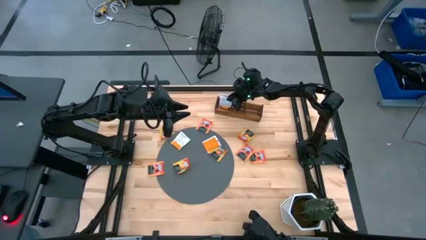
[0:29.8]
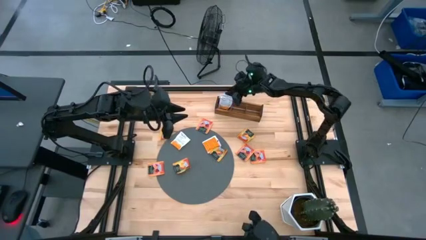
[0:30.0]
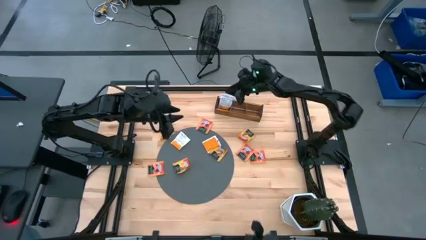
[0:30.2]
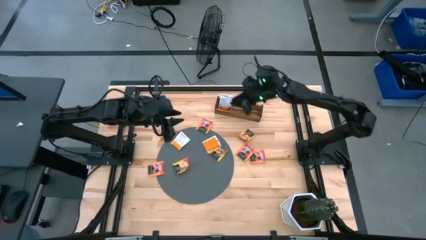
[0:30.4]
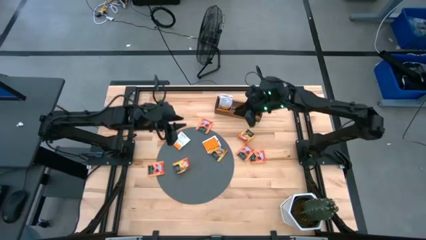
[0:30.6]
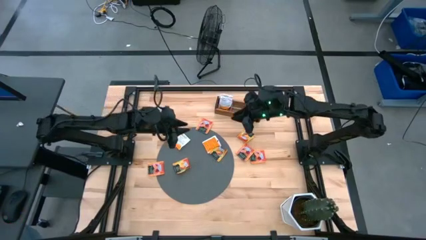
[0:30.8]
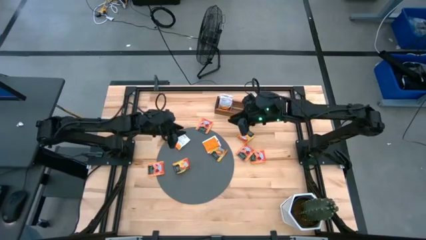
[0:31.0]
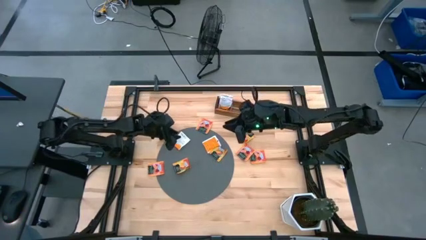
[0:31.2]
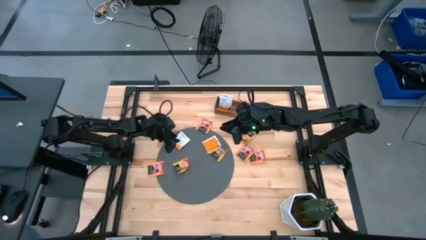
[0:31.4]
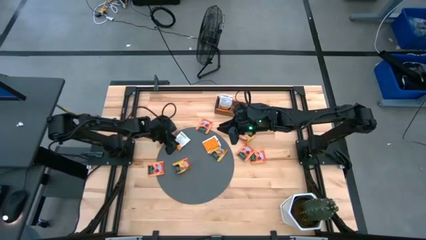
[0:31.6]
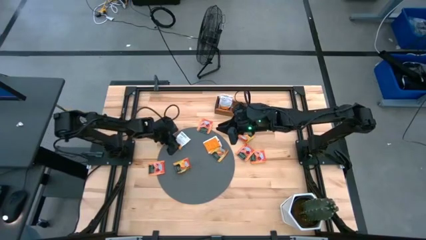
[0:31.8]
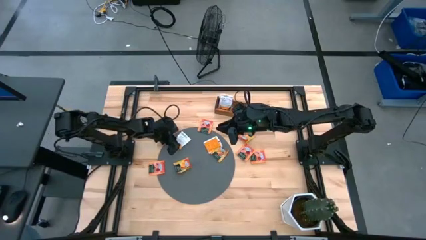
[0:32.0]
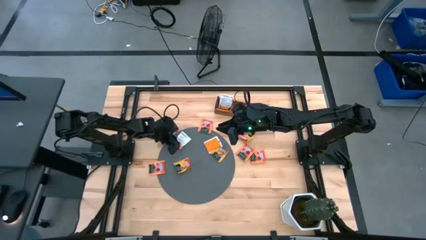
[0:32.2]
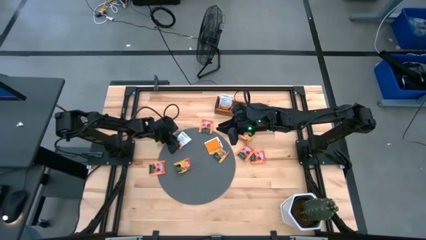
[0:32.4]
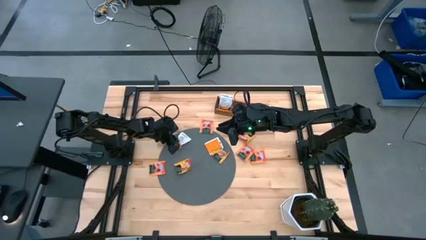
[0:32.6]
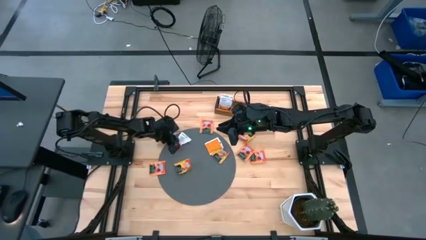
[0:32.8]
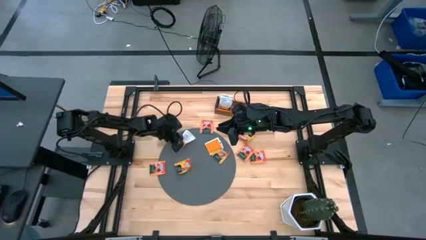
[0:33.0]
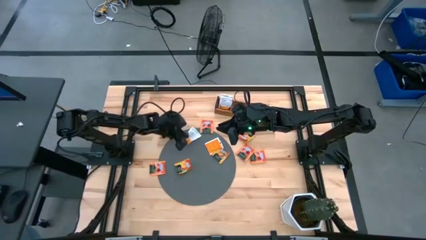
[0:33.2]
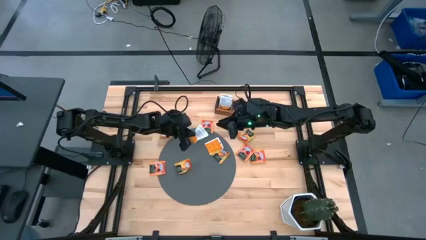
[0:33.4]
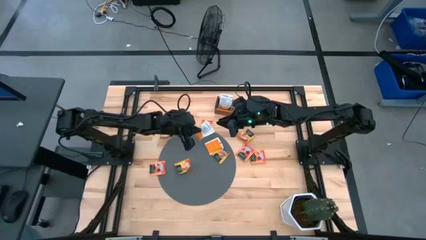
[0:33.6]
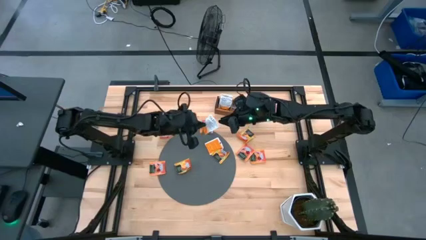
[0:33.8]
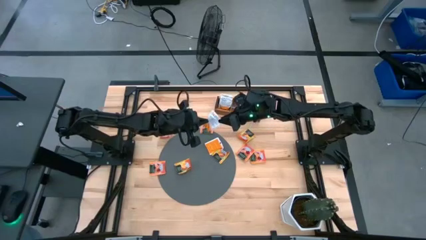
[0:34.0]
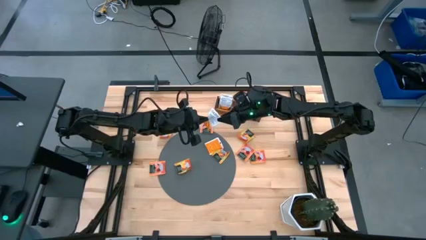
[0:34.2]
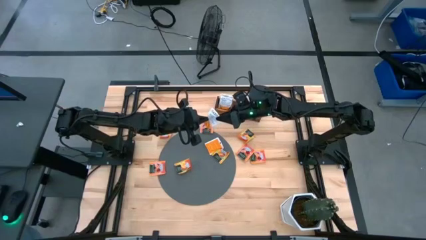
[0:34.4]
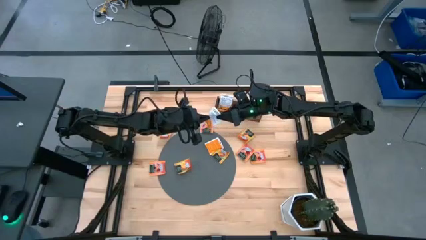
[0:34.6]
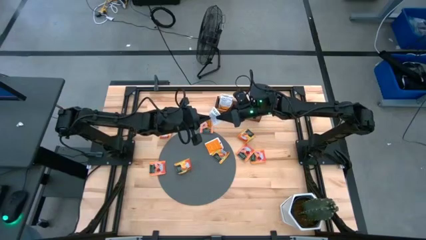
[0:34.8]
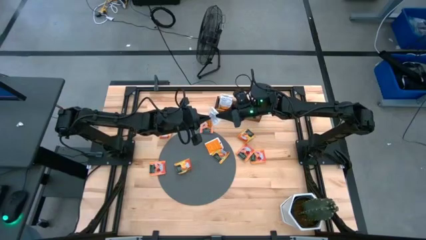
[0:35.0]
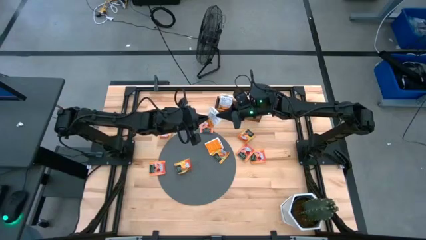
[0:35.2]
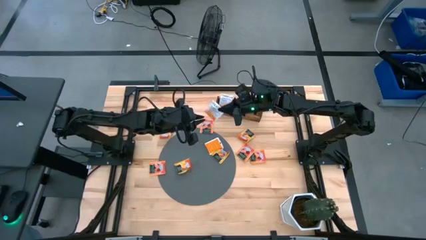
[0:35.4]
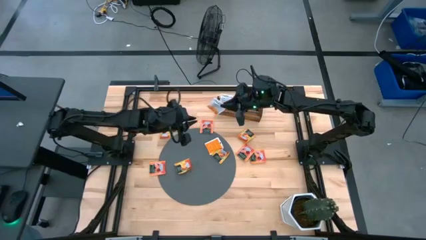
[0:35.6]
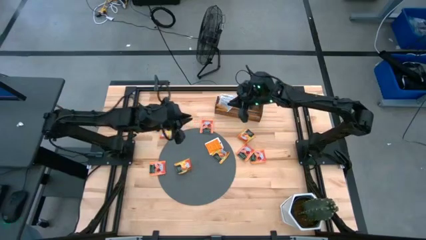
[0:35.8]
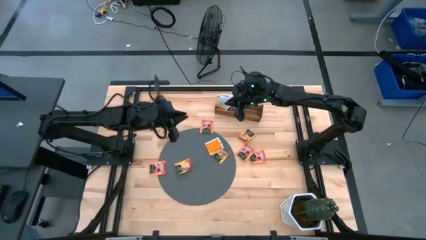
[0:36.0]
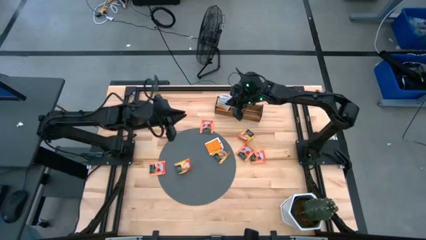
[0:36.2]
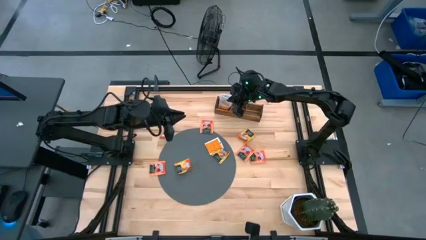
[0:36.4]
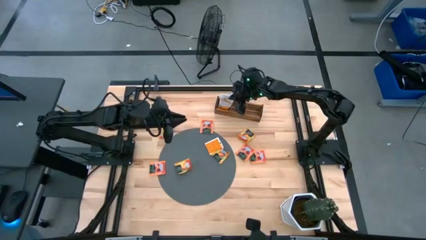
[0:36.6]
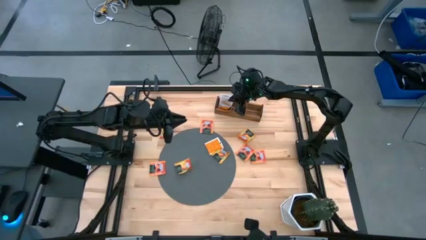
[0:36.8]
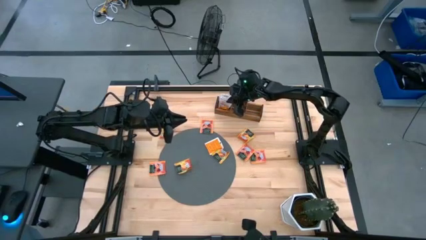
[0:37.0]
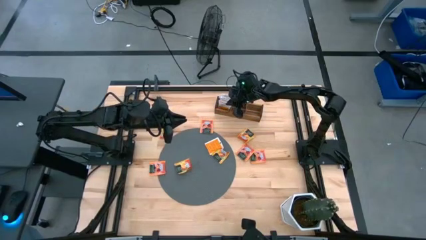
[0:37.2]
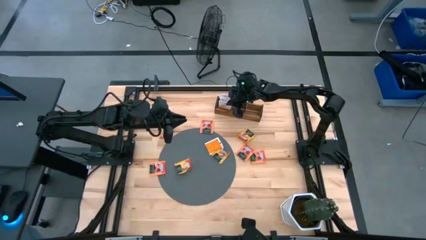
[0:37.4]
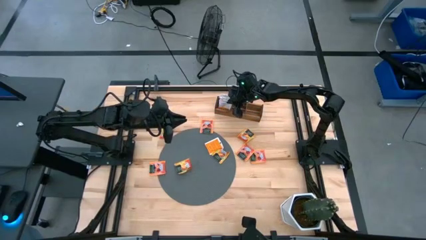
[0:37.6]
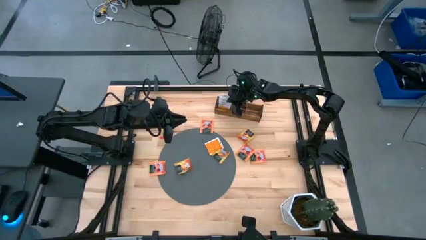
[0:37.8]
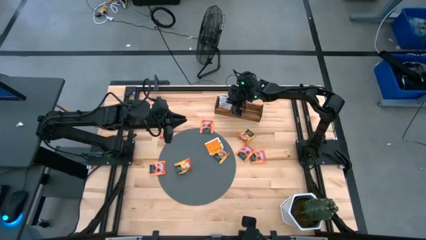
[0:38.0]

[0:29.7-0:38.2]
Task: Pick & Place Tea
Put the white tea bag into the left section of the wooden organizer

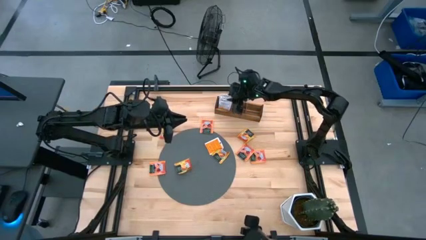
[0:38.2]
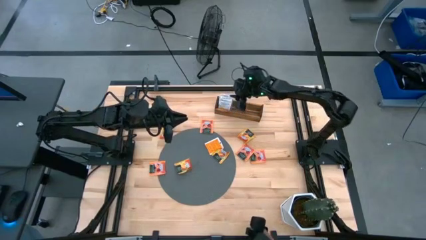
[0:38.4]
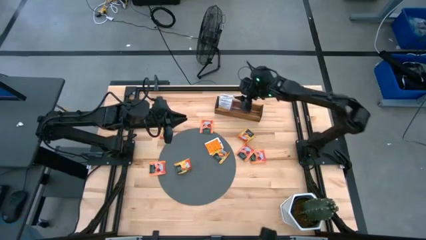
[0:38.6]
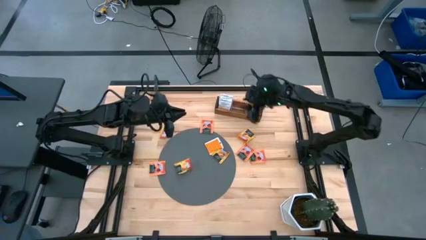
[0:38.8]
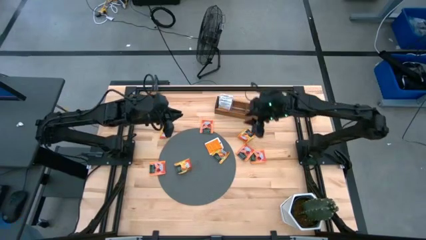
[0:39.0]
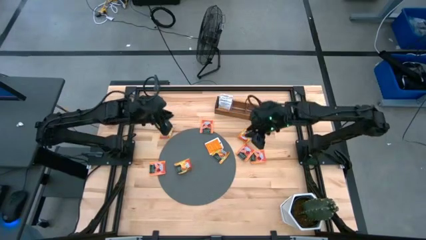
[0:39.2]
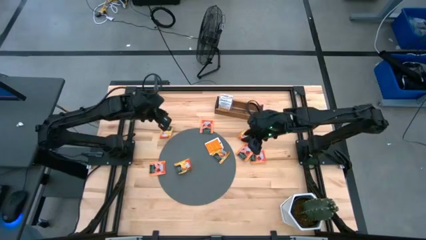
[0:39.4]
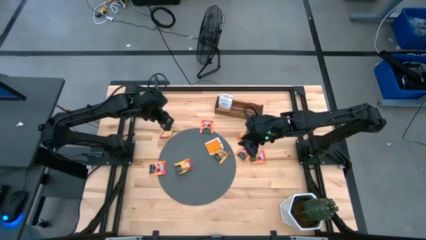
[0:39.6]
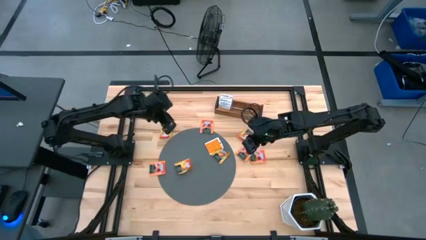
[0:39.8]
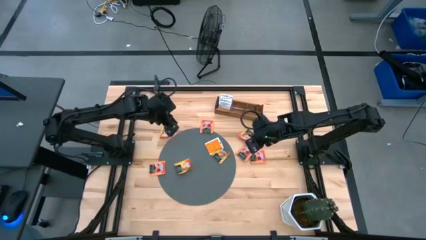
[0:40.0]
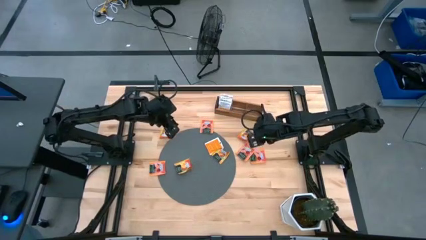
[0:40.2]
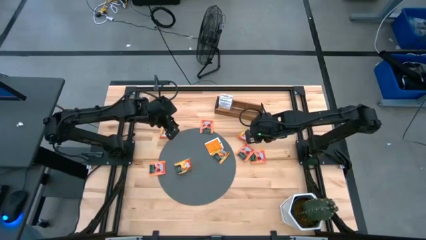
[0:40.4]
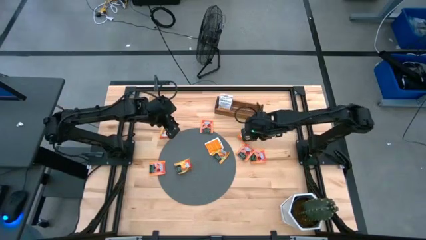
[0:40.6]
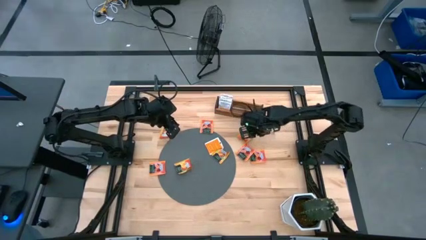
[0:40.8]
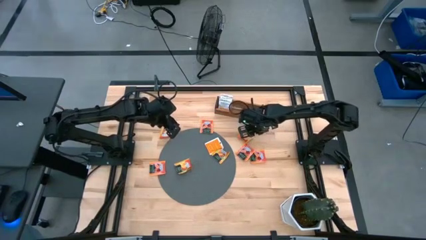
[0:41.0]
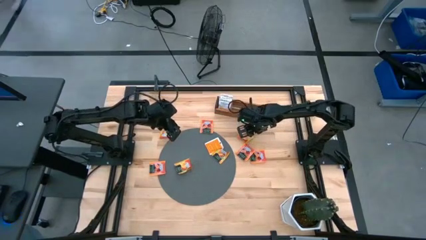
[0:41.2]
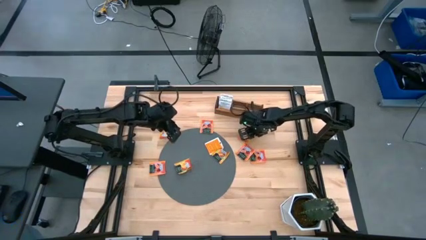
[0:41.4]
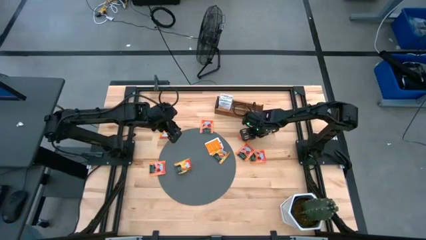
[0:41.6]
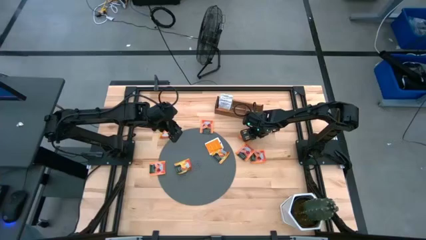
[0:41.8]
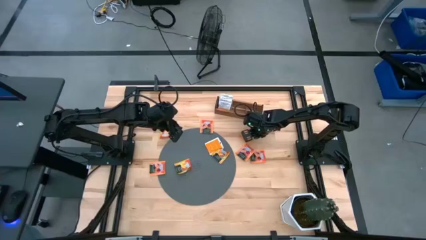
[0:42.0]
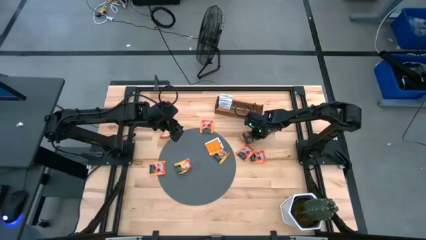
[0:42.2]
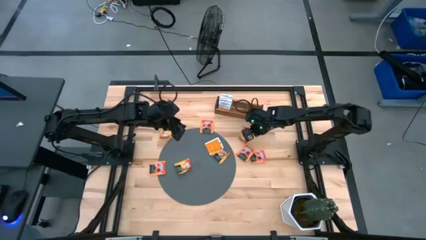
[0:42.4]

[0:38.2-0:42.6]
Put the yellow tea bag into the middle section of the wooden organizer

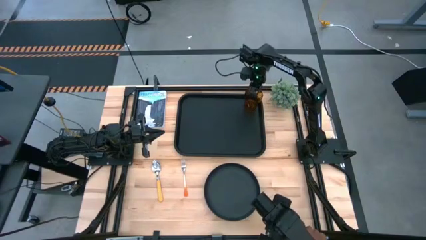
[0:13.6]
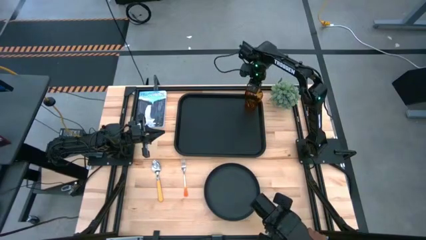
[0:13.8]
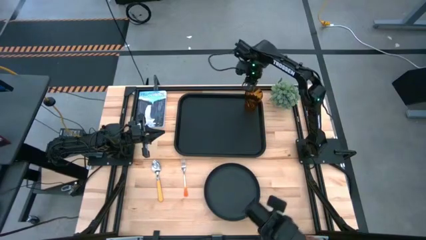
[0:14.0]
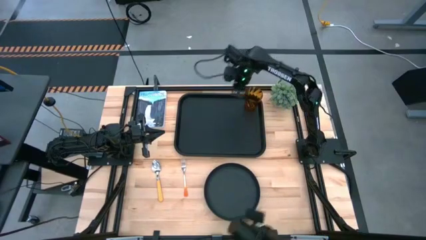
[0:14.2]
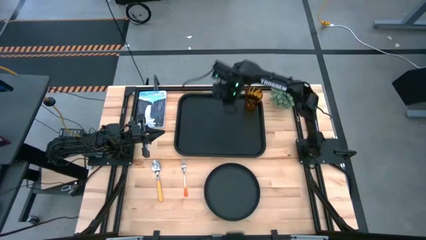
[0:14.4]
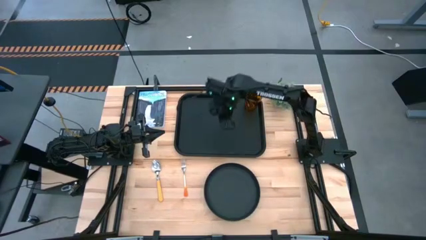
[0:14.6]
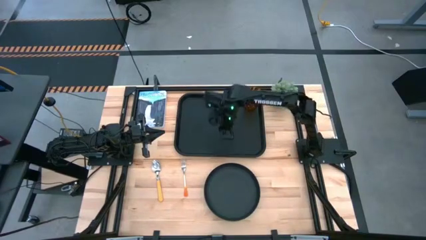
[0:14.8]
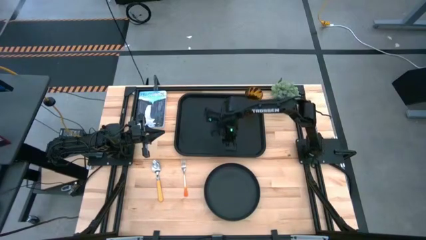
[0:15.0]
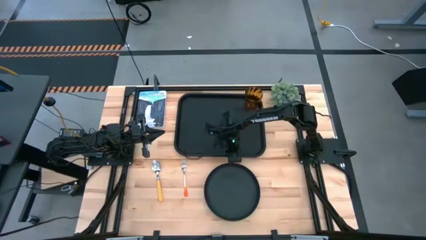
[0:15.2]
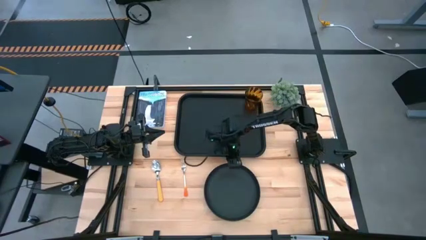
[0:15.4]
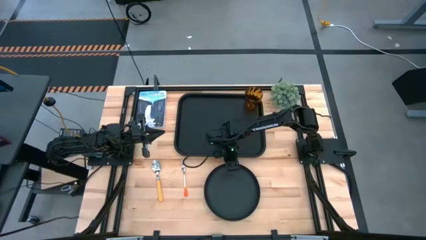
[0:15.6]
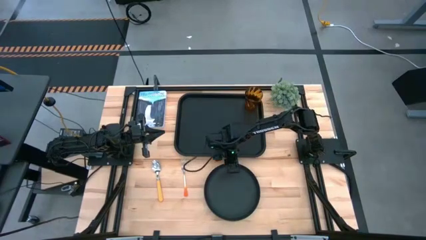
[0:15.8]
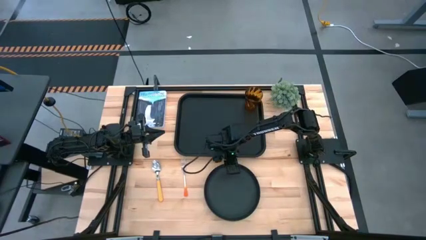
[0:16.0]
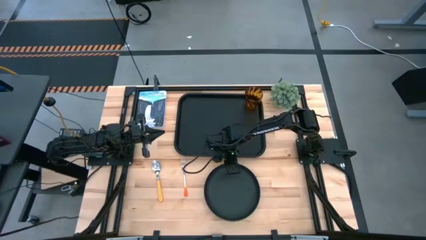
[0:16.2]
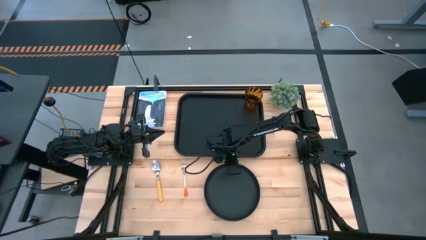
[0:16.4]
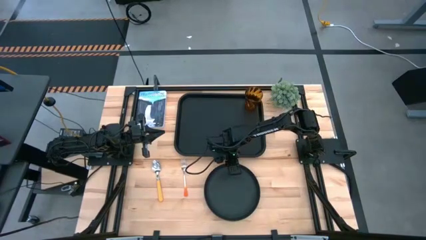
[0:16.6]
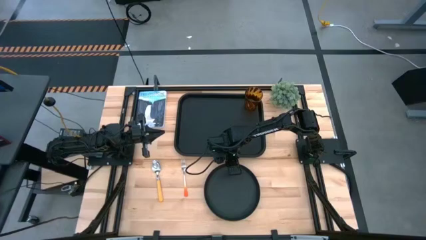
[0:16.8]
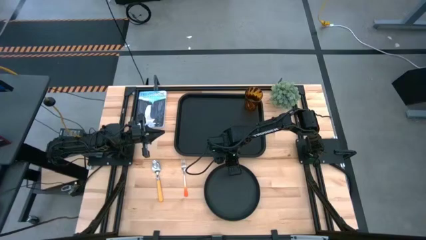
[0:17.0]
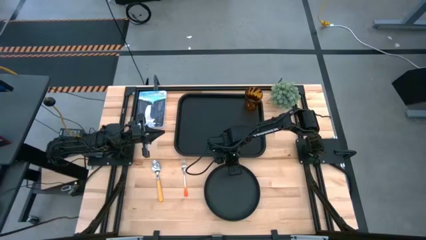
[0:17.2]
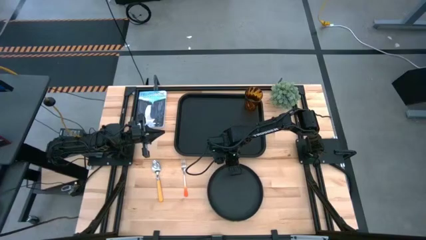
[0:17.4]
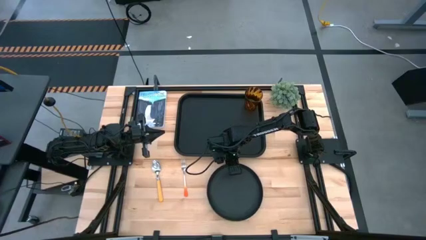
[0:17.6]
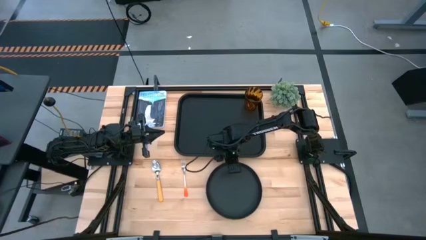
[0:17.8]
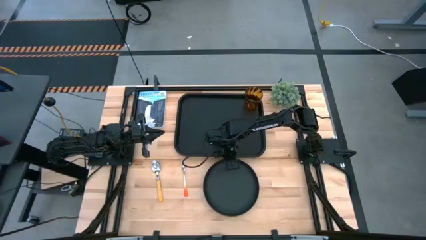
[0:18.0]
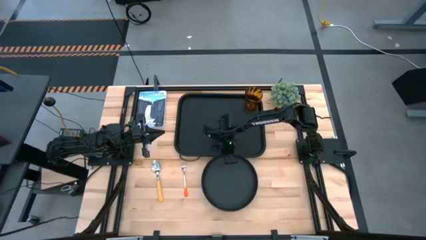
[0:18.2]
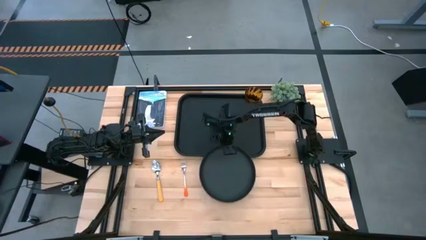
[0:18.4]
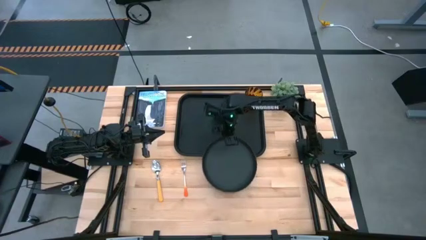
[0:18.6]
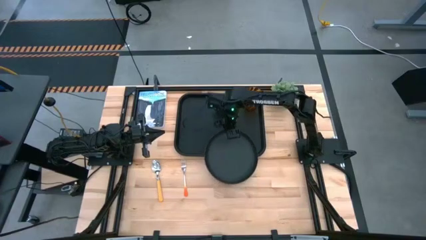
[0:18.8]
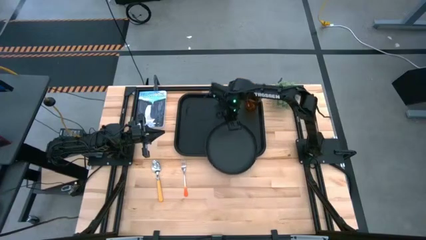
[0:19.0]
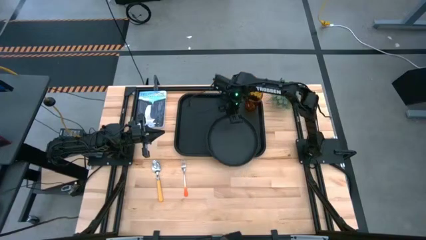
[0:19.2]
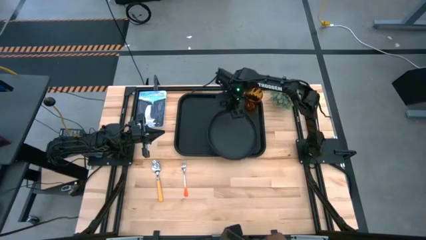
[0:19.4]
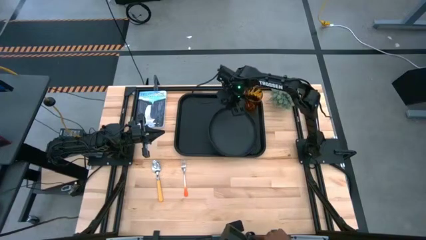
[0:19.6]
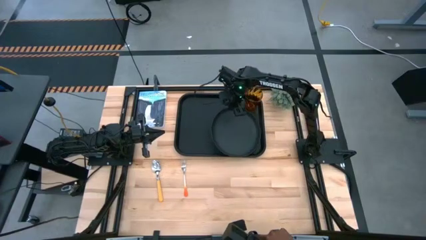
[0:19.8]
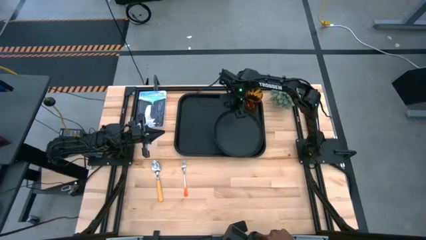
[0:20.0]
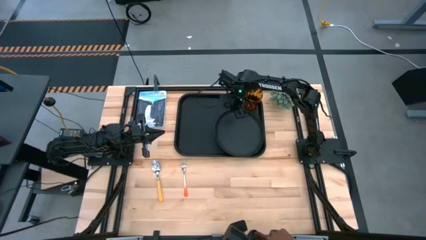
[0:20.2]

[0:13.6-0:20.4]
Task: Pick and place plate/cup/fork/spoon on tray
Put the black plate on the black tray to the bottom of the brown transparent glass cup
